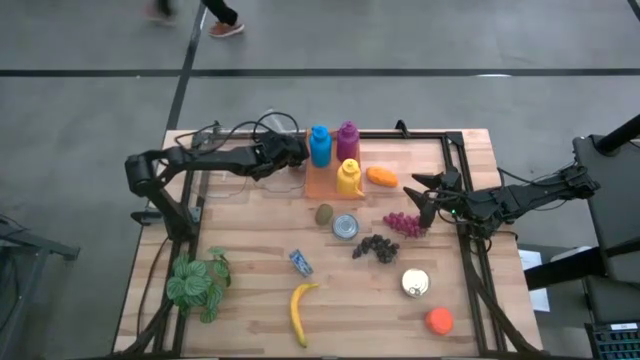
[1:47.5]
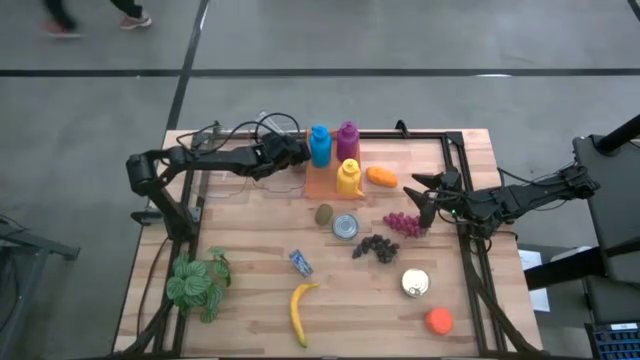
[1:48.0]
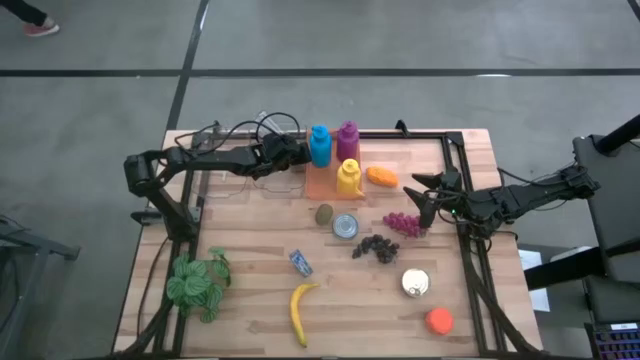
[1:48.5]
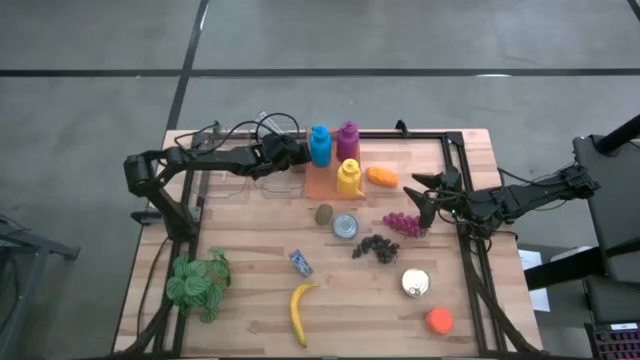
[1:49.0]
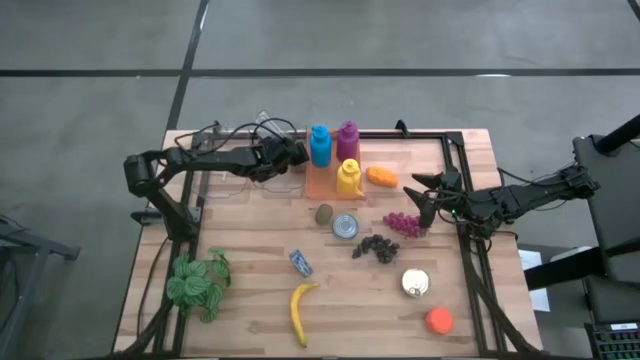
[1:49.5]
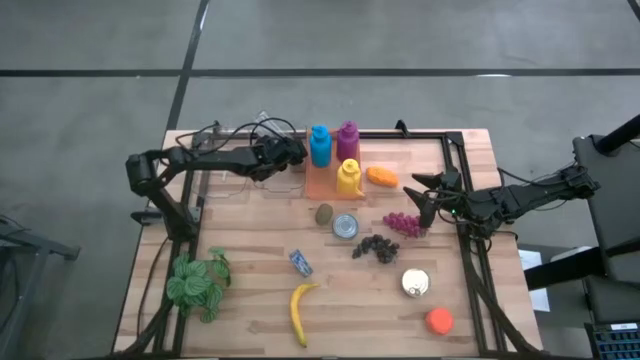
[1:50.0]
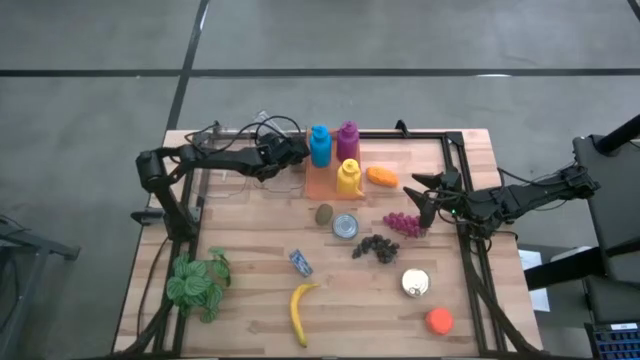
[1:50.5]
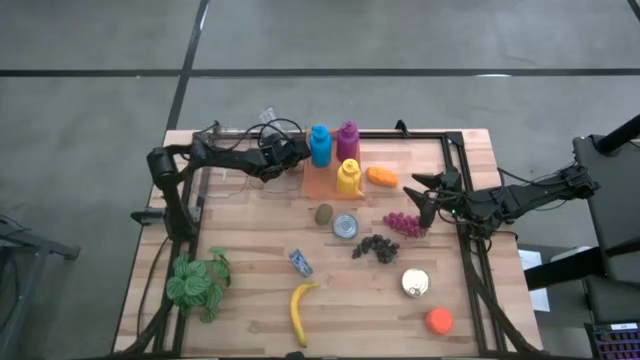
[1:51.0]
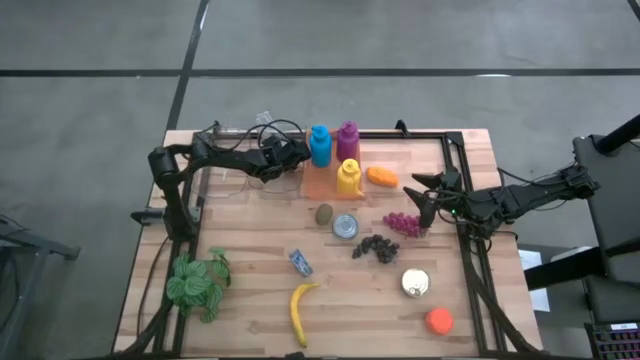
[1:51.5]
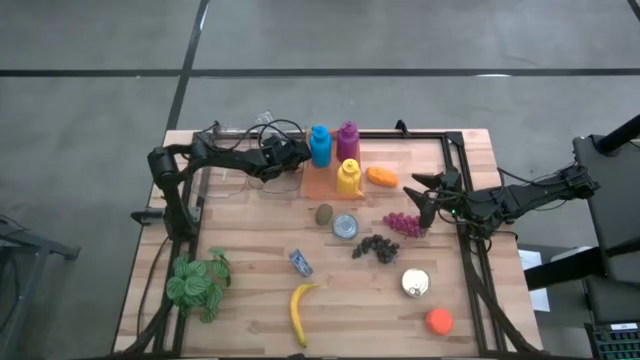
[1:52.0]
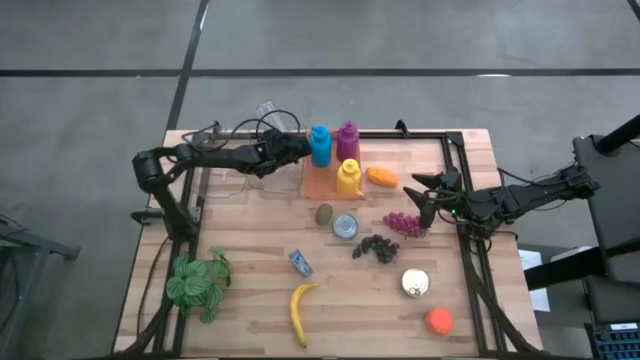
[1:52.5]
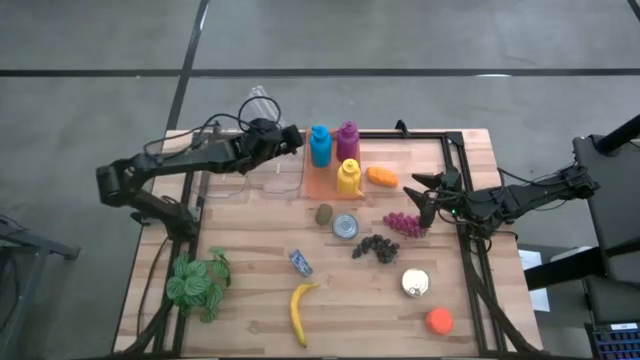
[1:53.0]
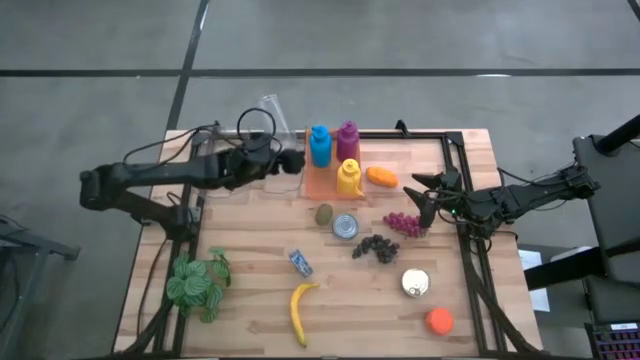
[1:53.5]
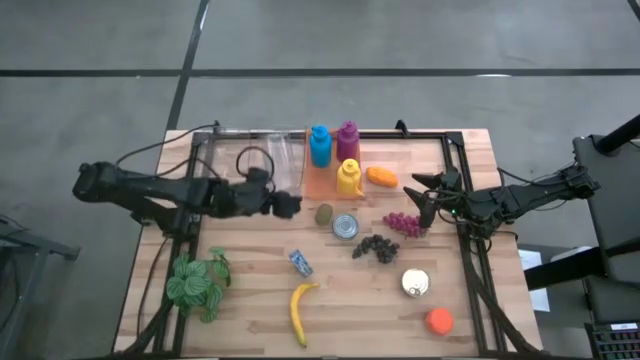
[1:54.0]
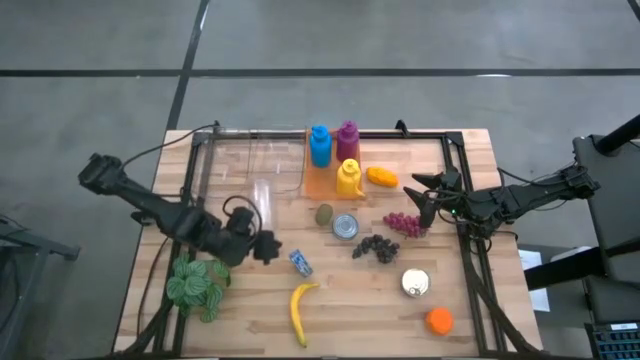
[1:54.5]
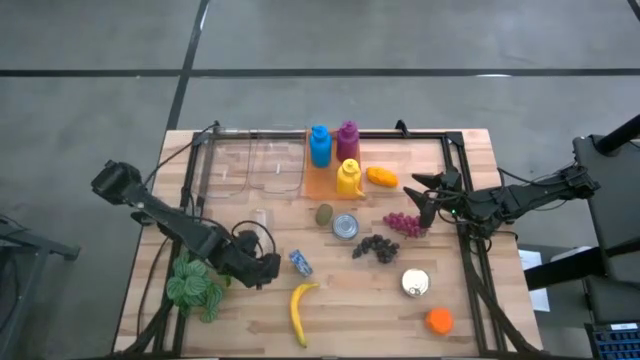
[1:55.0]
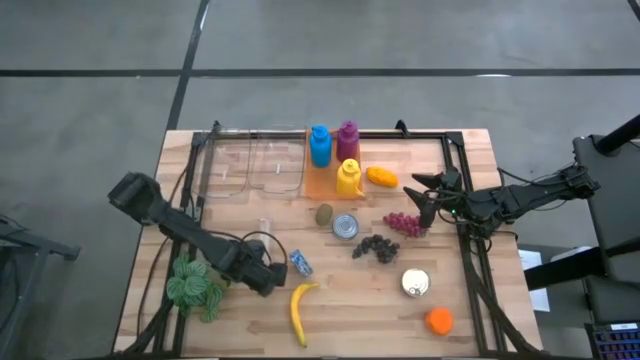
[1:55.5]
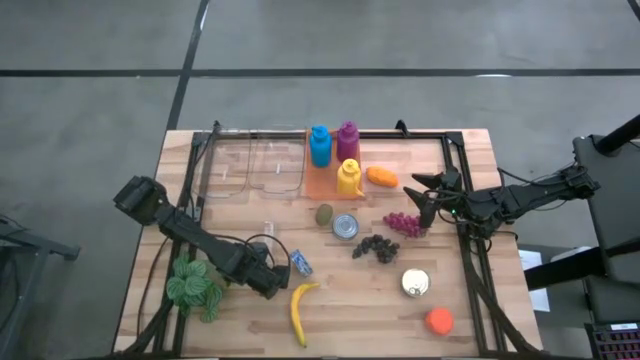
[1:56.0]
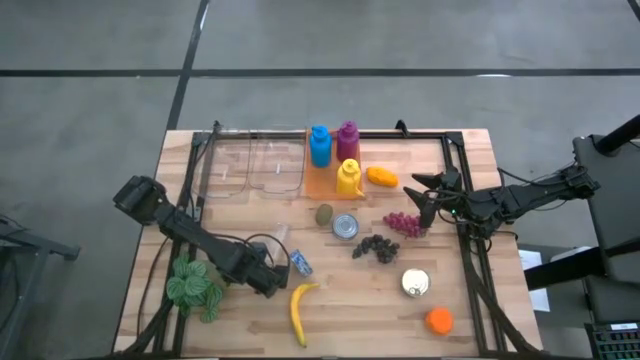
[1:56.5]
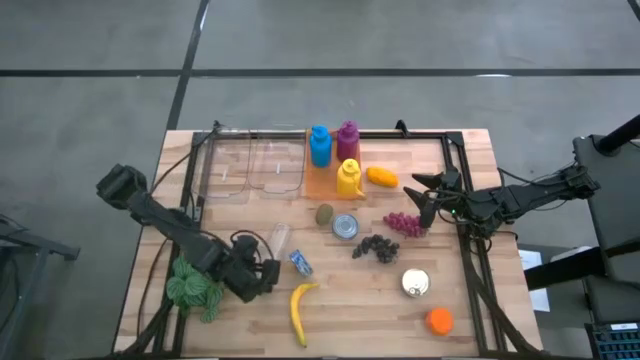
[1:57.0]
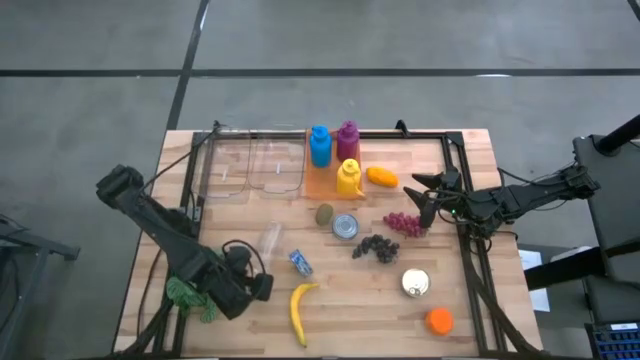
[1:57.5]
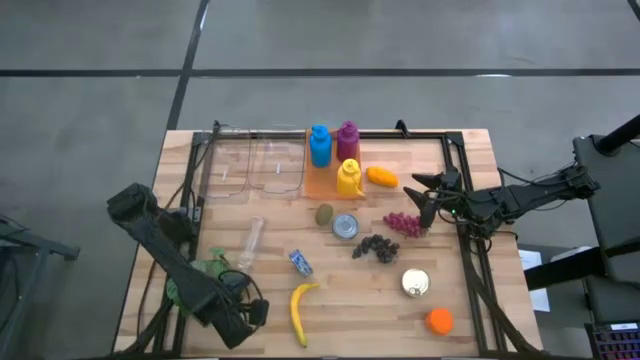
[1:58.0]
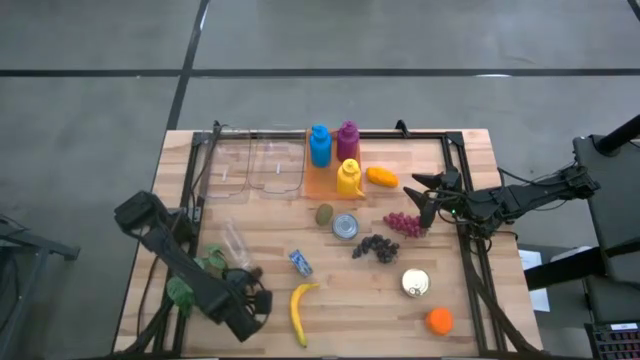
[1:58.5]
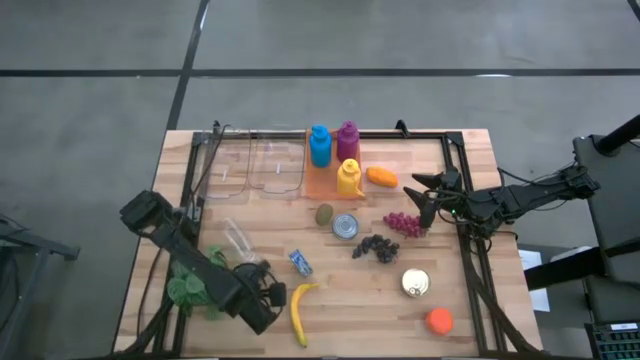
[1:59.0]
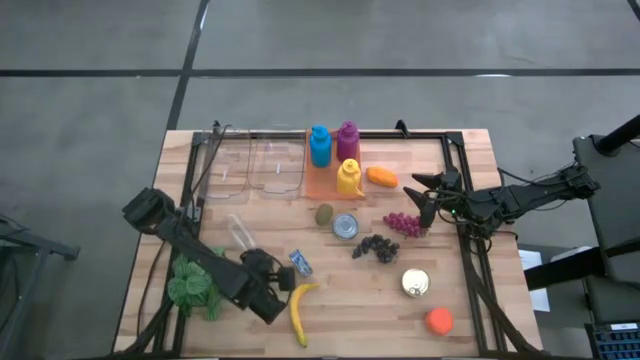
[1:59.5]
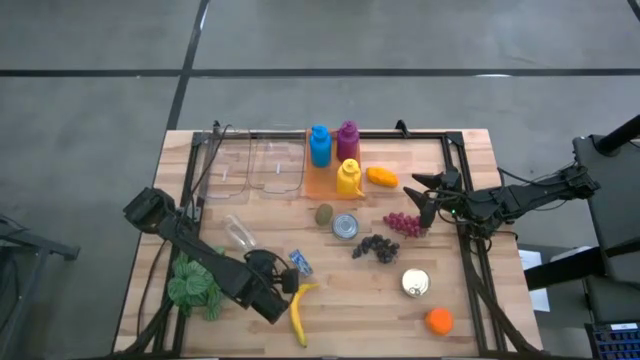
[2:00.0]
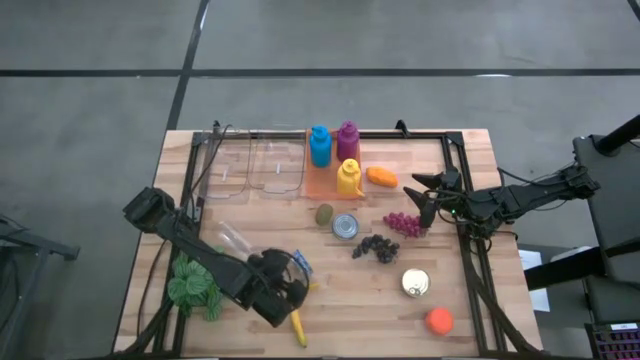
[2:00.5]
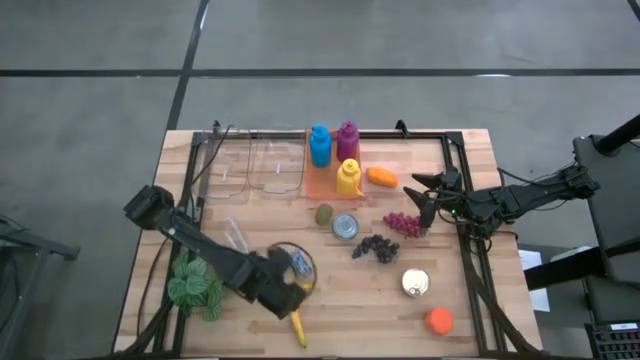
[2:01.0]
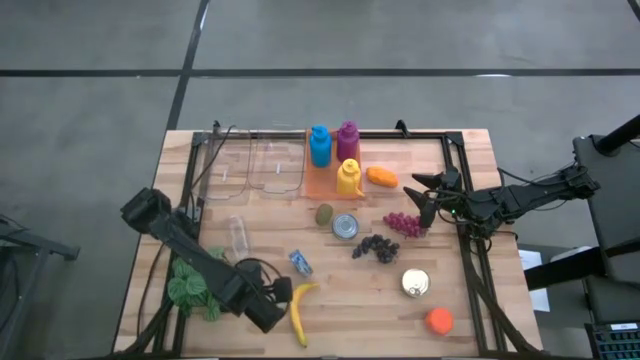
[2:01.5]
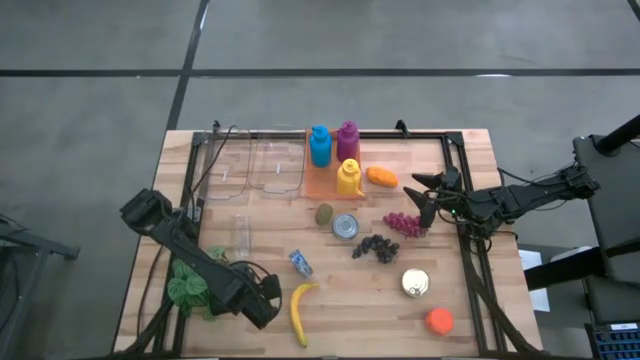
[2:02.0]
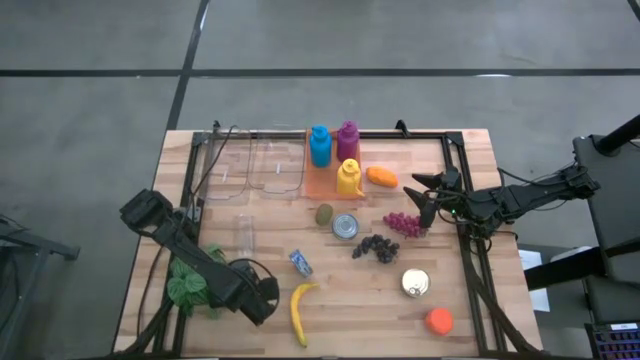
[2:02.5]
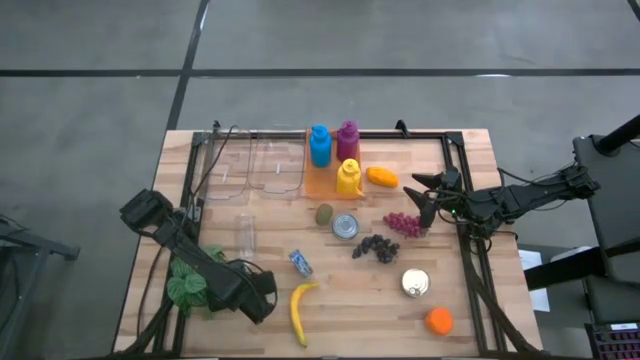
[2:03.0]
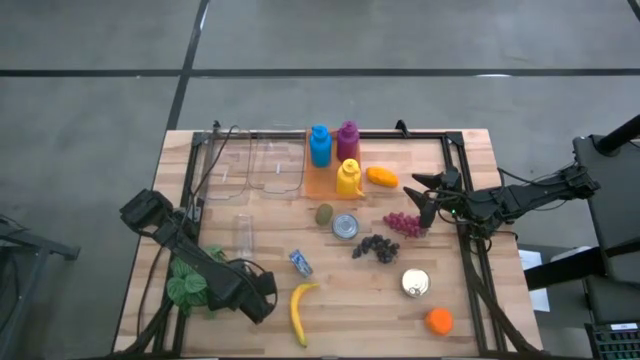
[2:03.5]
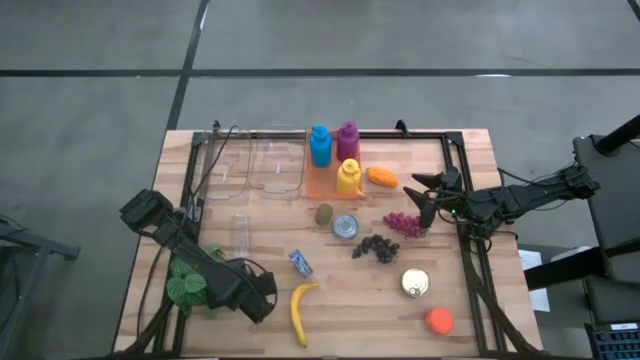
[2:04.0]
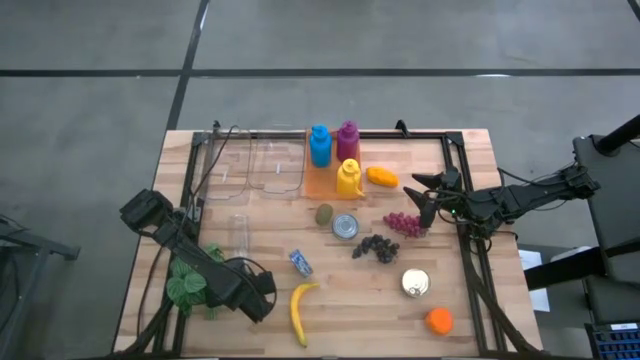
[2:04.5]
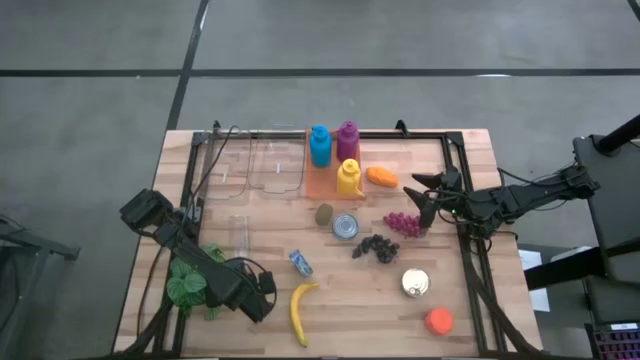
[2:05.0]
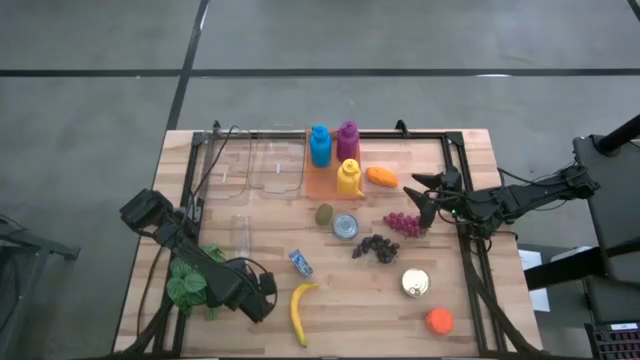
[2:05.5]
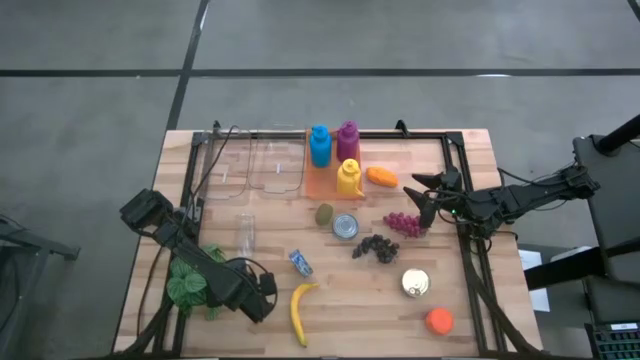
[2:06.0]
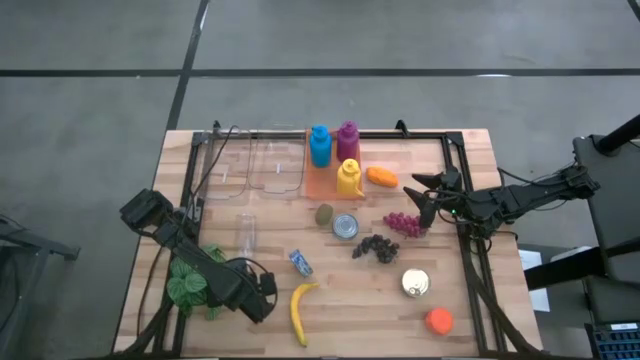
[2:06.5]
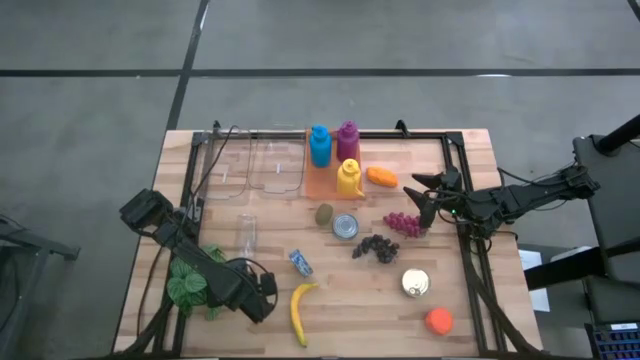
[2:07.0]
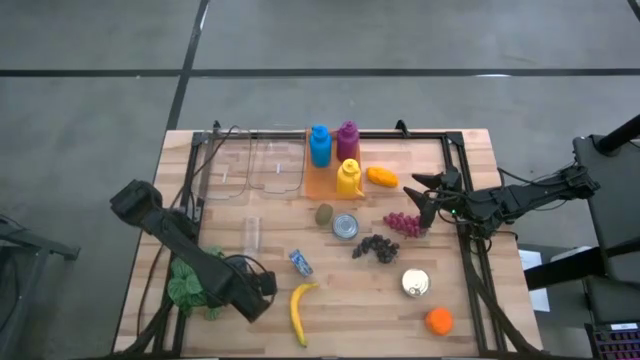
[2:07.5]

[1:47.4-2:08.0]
Task: Pick & Place Food Item
Put the transparent tumbler into the orange bin
